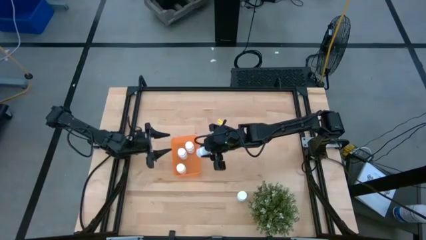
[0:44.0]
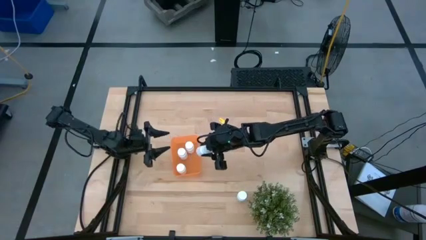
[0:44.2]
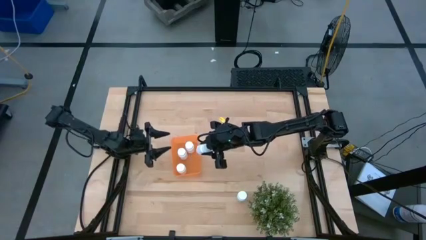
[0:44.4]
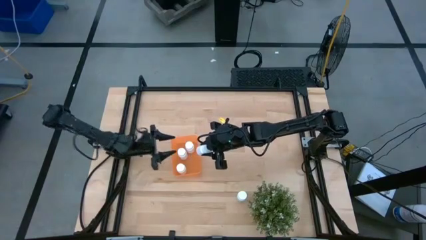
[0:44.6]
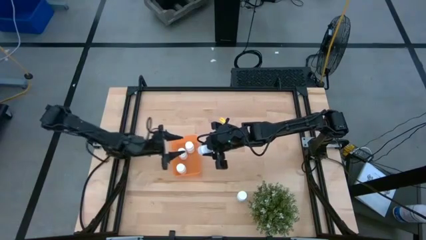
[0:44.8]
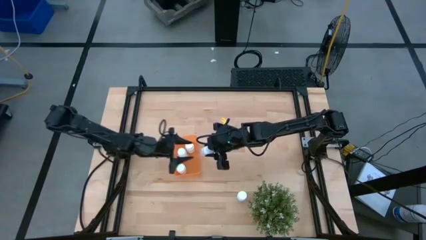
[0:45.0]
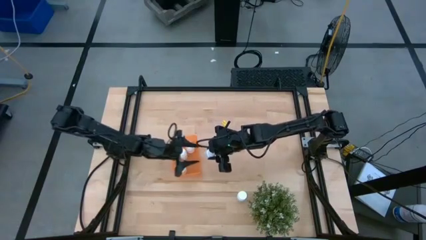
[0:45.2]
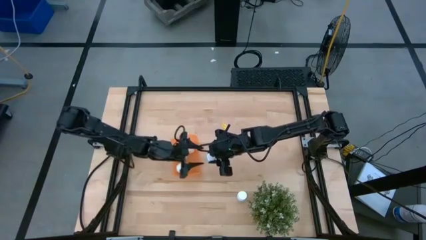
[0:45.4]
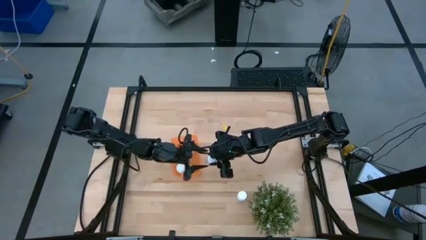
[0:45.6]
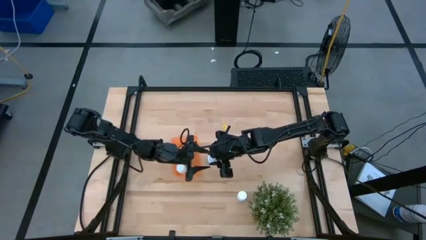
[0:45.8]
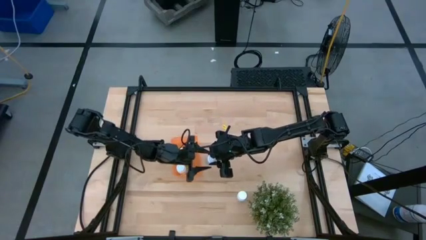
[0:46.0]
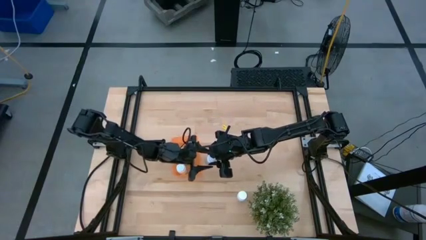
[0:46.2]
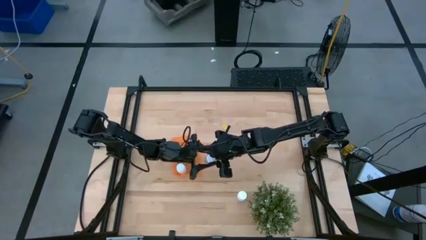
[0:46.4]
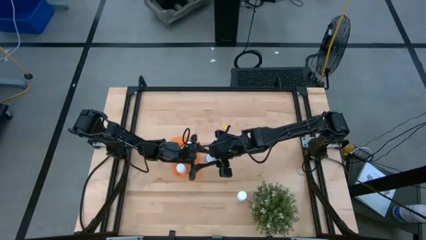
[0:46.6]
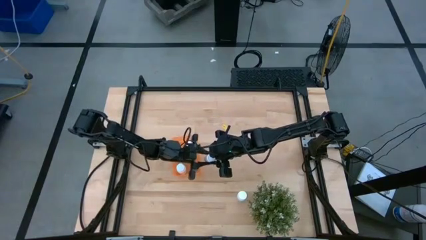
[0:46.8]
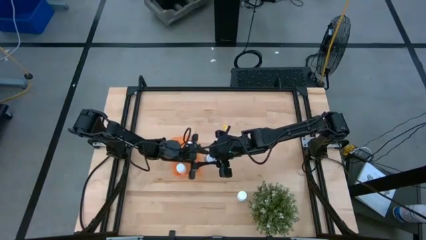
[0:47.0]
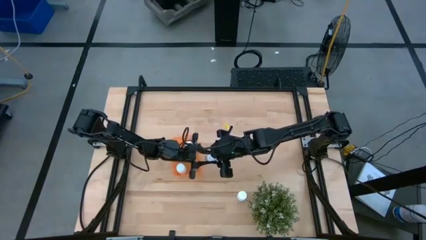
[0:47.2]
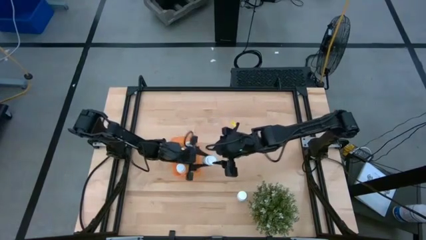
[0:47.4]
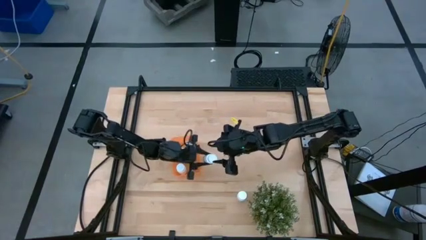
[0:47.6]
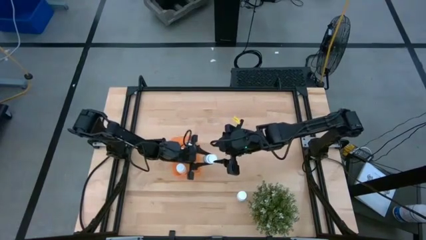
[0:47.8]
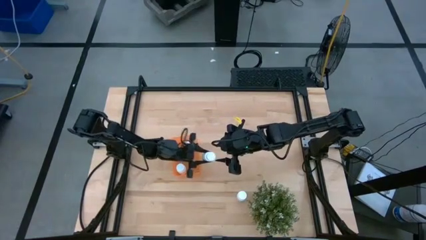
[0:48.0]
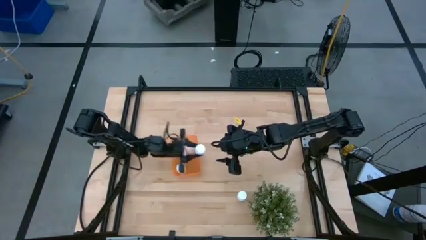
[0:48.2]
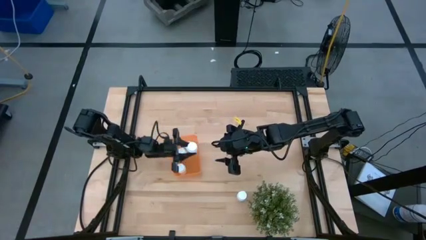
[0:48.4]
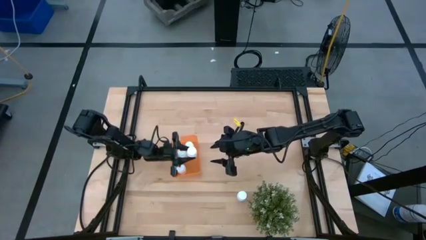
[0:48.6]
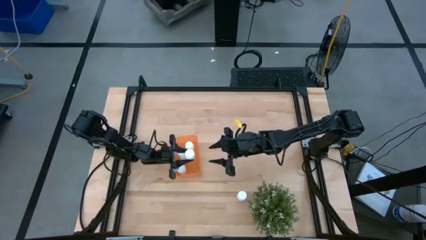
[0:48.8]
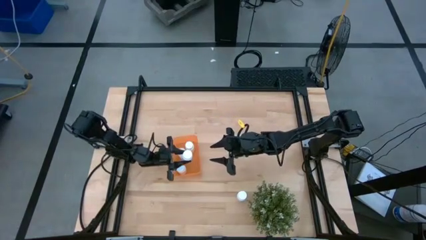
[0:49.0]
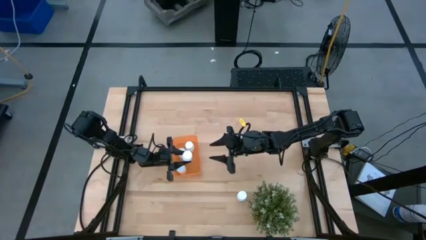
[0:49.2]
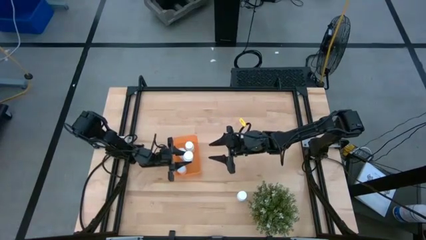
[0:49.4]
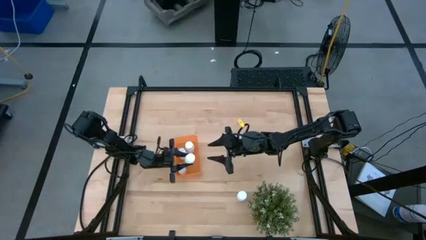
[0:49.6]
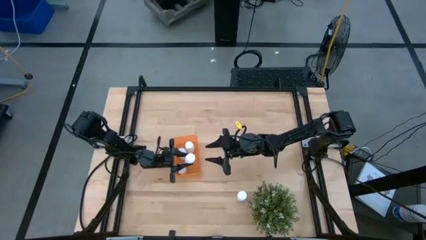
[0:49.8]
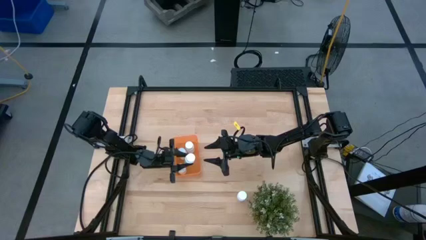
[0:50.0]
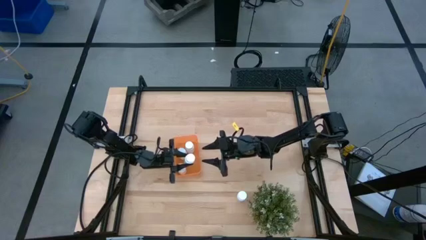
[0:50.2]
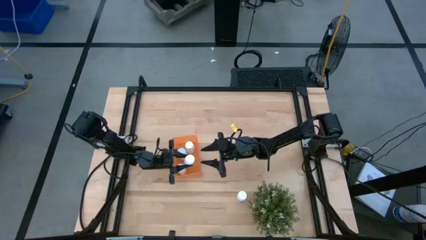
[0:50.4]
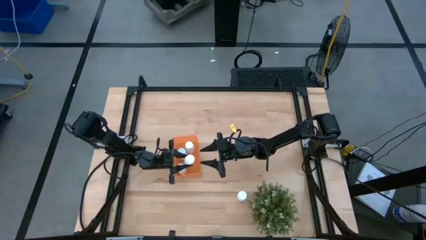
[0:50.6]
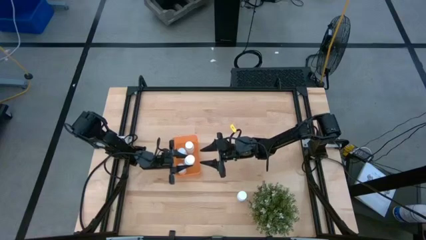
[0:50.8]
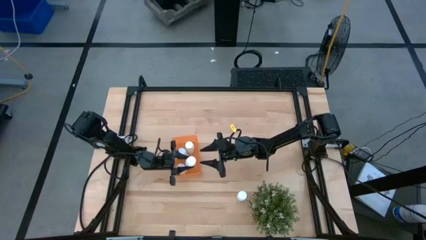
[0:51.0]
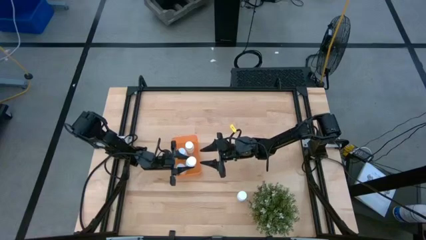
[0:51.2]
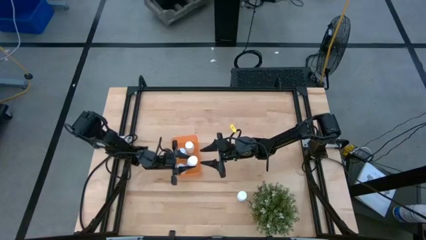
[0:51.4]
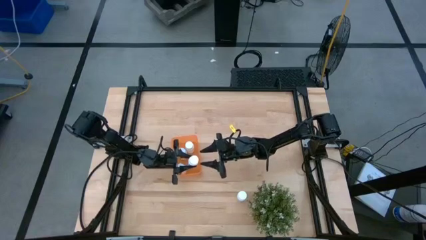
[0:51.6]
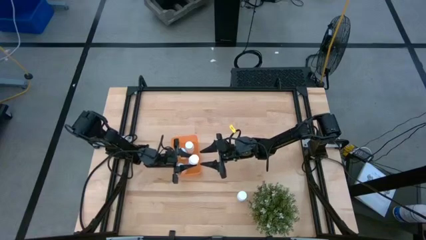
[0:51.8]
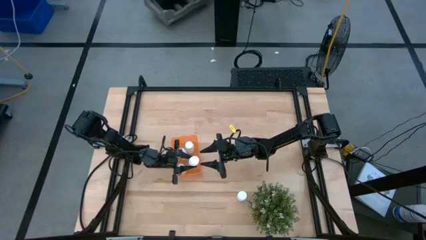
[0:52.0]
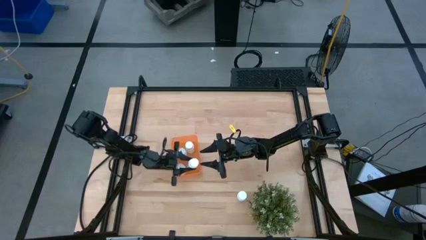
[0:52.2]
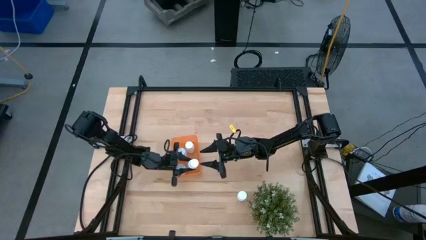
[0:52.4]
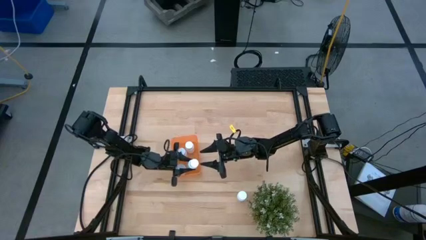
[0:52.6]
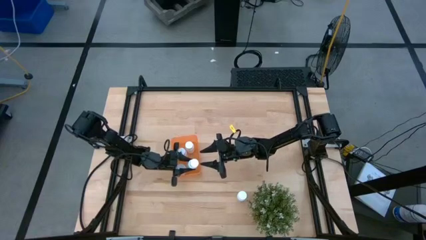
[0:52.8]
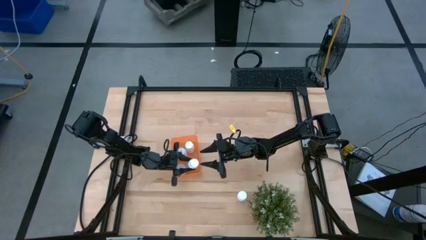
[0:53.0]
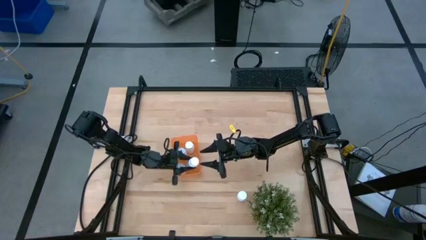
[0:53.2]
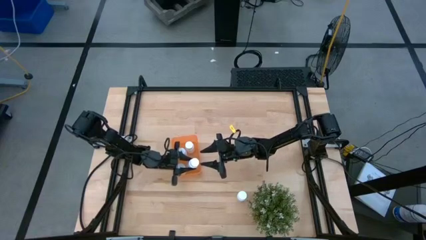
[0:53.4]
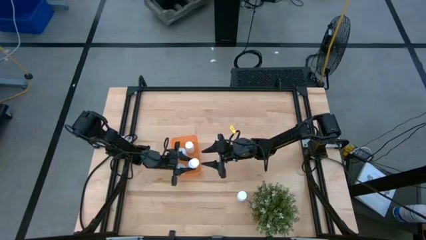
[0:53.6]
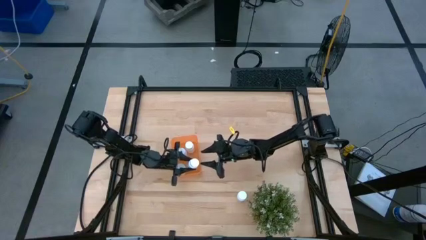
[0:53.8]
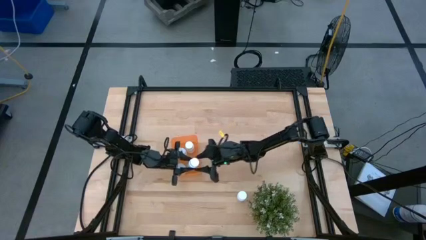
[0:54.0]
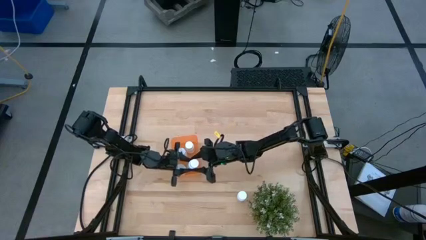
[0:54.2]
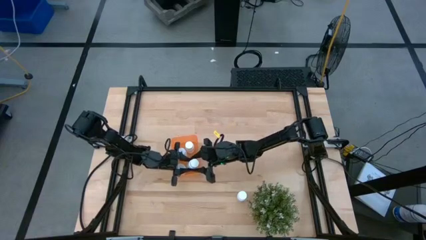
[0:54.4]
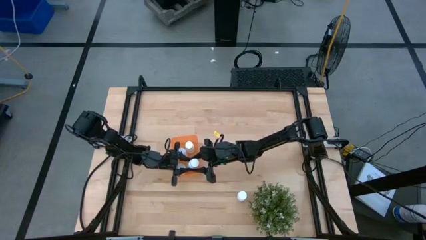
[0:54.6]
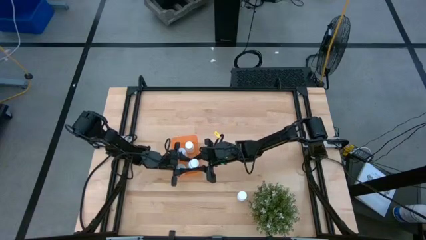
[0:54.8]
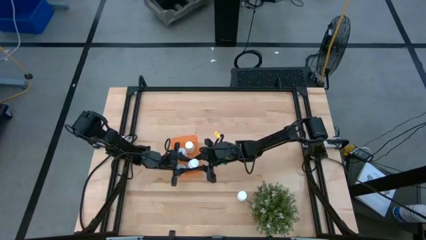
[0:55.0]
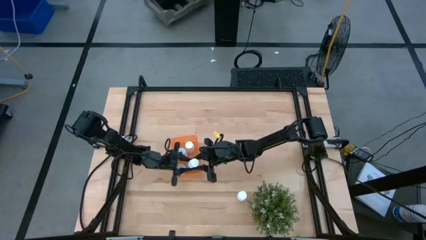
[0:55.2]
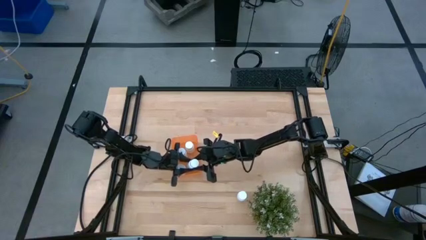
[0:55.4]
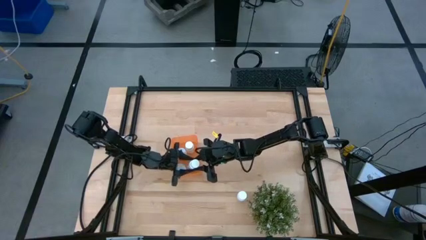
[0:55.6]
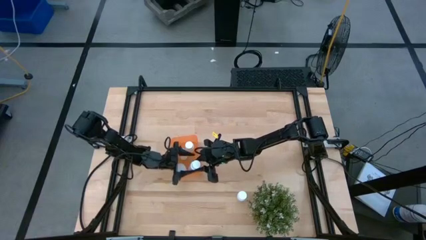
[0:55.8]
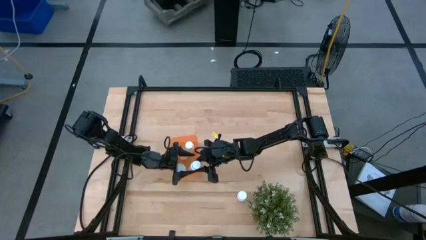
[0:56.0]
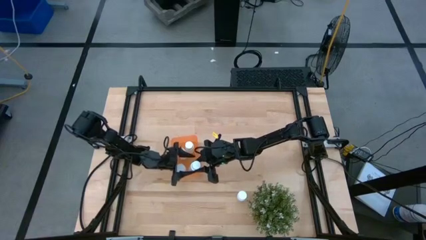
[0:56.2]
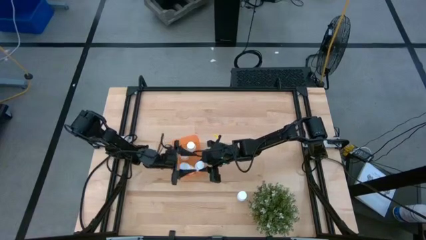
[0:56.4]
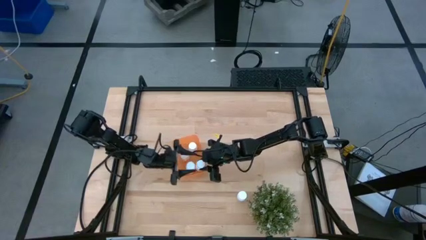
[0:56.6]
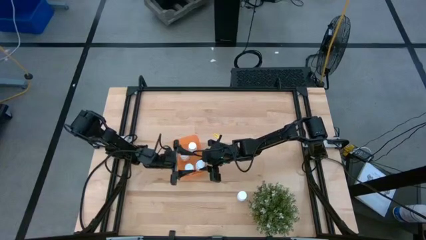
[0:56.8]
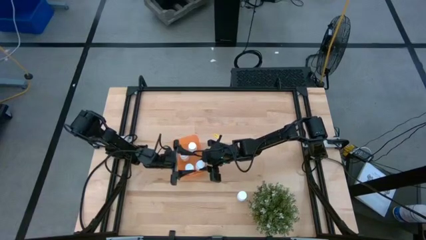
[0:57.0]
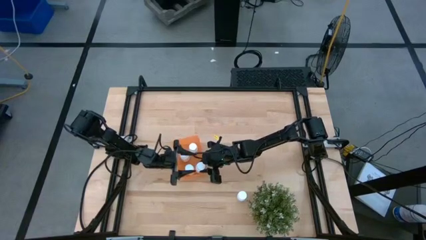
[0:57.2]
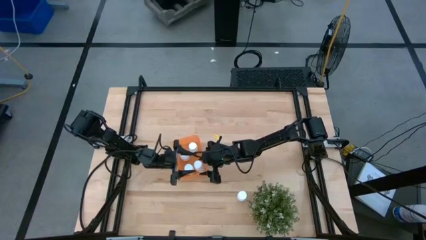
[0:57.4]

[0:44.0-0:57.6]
Task: Pick and place pill bottles into a basket
Put the white medicine bottle into the orange bin

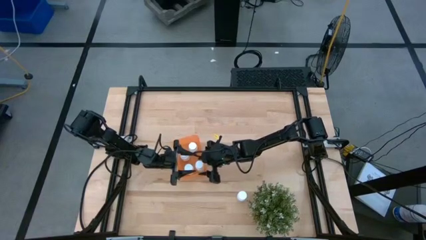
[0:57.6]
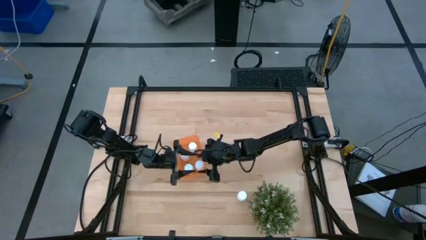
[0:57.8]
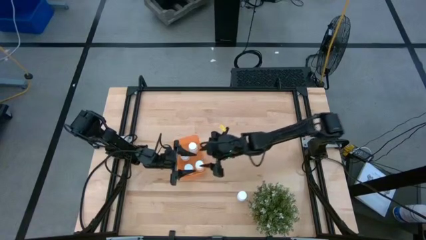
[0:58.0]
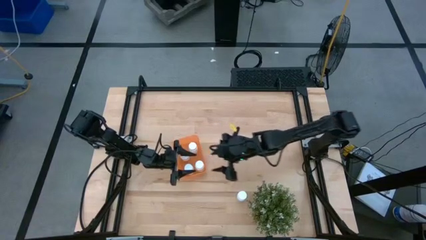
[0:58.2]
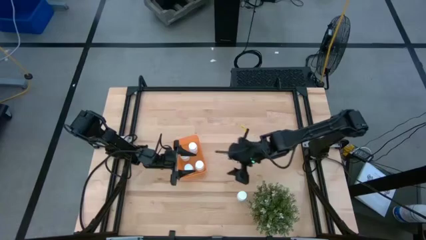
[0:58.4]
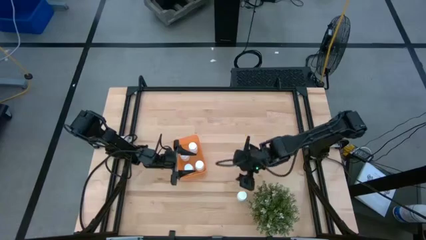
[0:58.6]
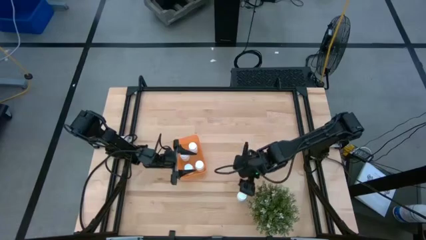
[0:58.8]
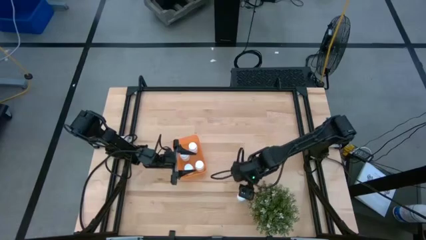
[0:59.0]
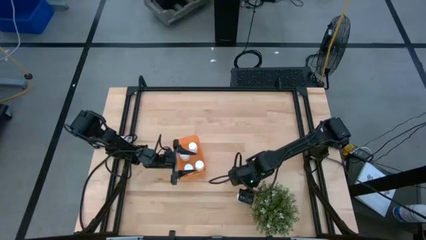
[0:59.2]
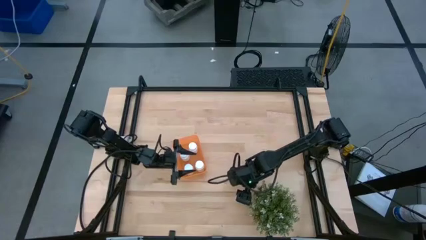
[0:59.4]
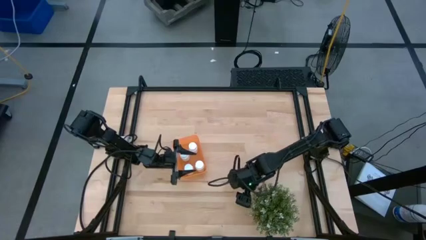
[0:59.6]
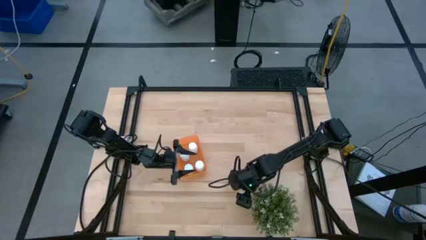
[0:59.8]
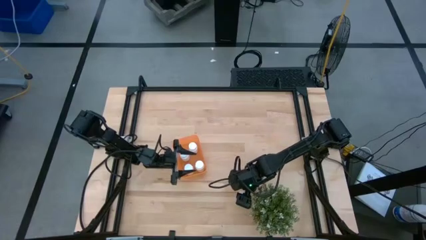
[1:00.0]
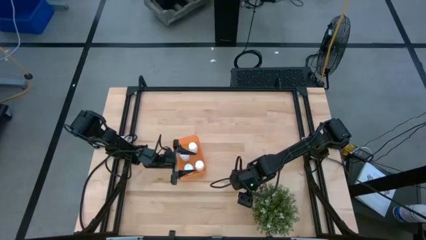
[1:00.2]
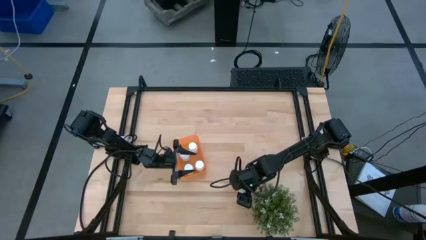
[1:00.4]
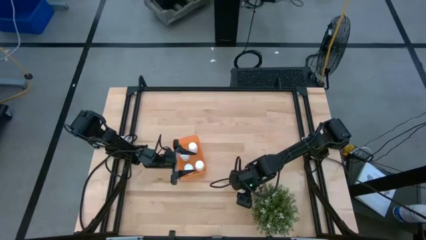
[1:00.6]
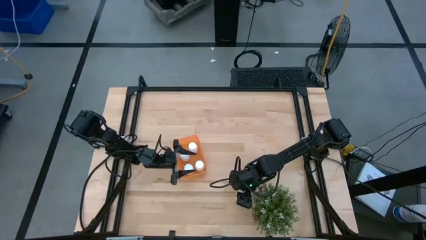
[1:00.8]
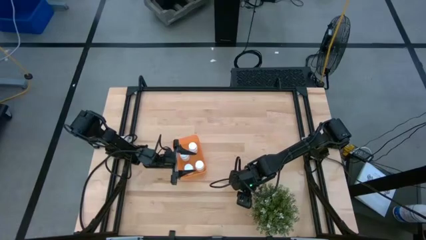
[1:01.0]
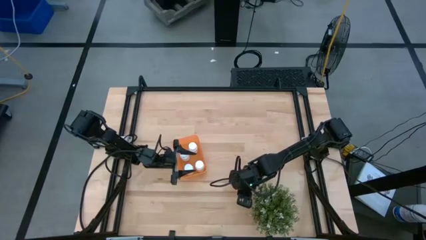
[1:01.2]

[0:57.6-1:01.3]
Put the white medicine bottle into the orange bin
